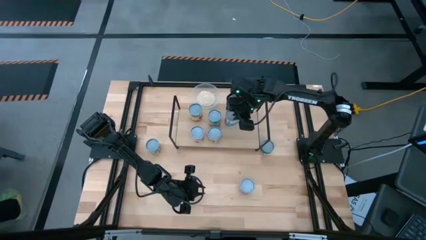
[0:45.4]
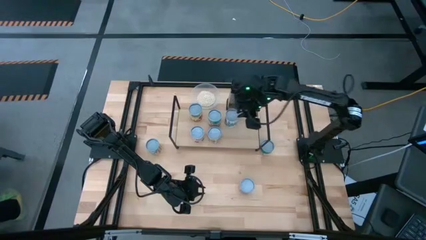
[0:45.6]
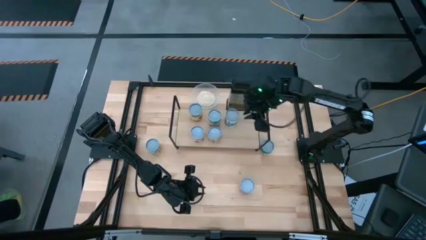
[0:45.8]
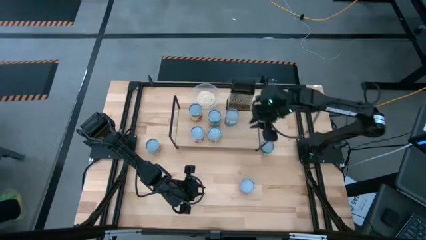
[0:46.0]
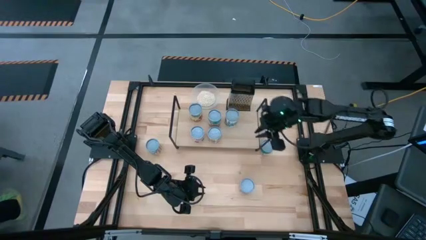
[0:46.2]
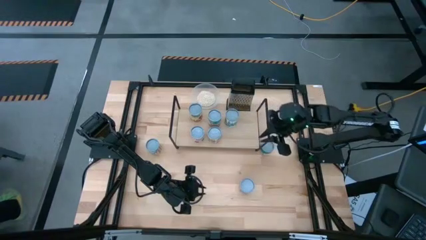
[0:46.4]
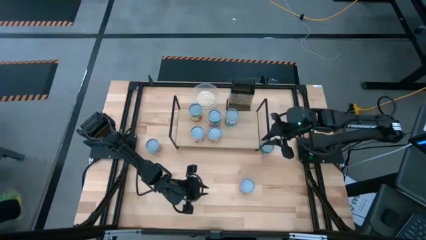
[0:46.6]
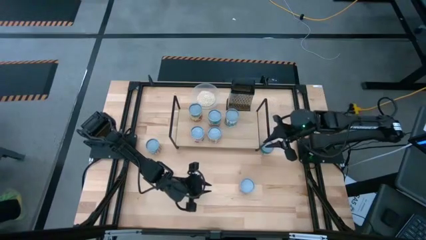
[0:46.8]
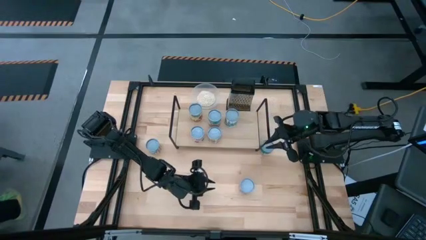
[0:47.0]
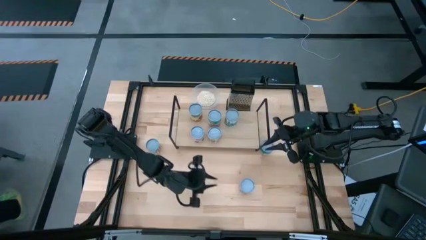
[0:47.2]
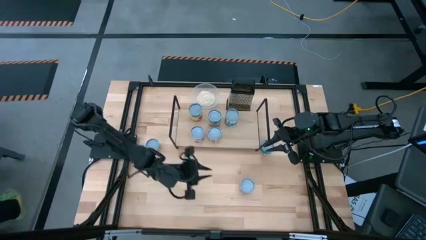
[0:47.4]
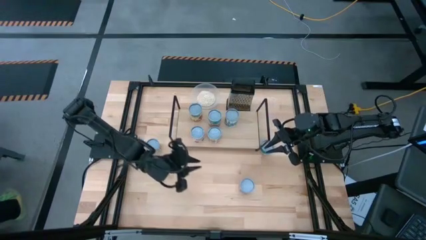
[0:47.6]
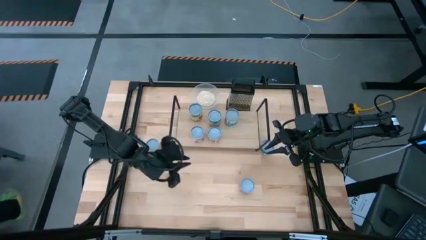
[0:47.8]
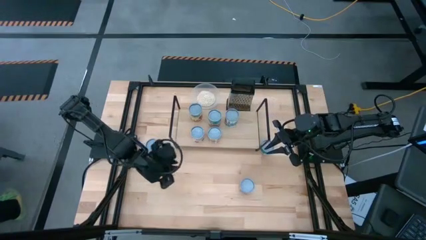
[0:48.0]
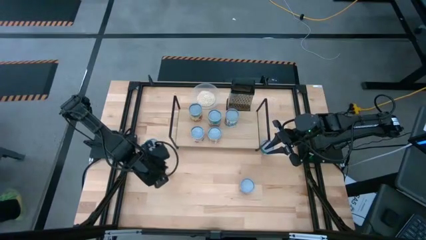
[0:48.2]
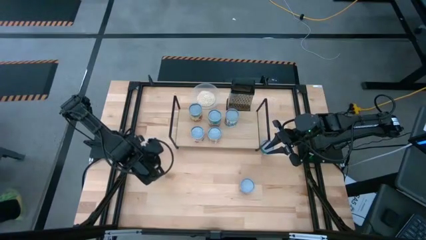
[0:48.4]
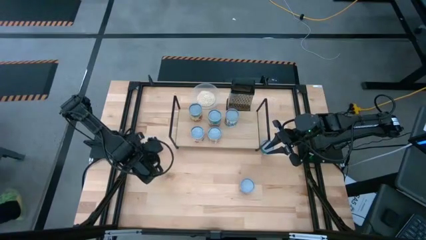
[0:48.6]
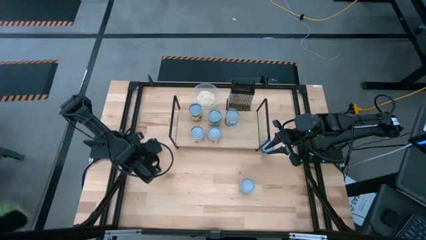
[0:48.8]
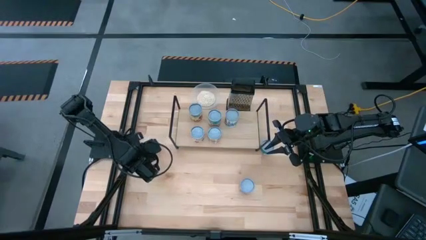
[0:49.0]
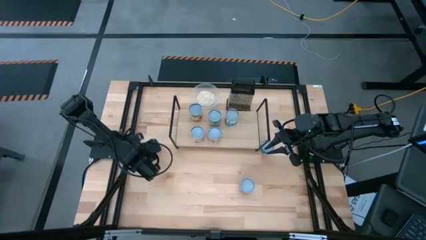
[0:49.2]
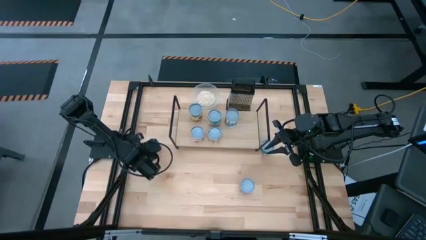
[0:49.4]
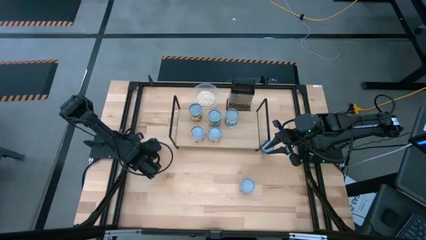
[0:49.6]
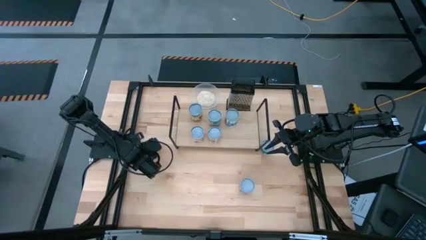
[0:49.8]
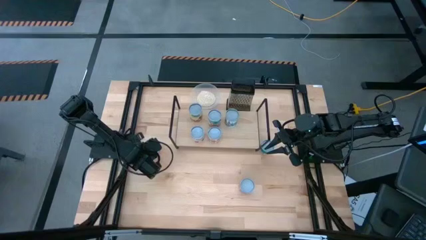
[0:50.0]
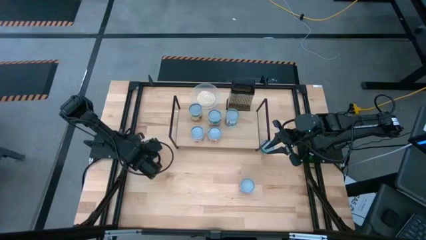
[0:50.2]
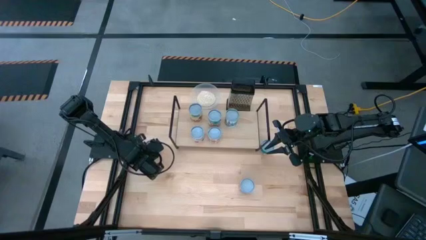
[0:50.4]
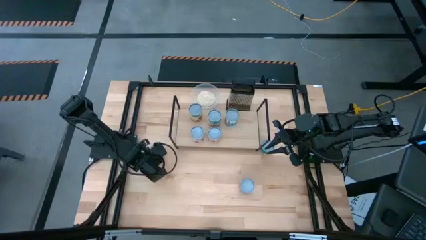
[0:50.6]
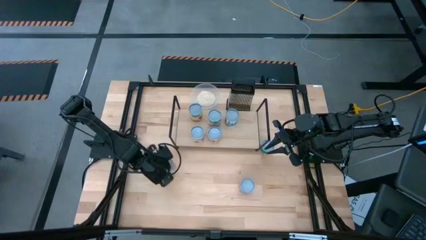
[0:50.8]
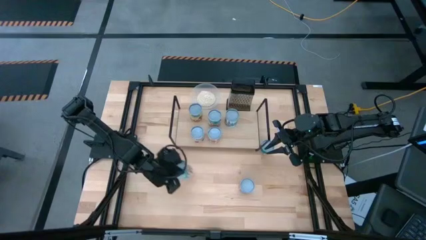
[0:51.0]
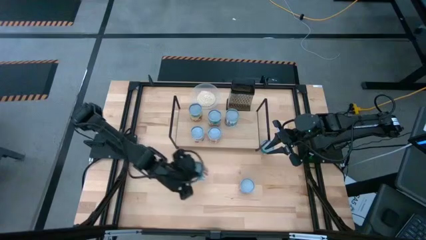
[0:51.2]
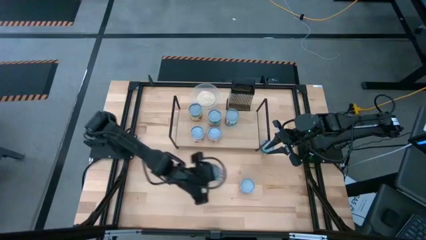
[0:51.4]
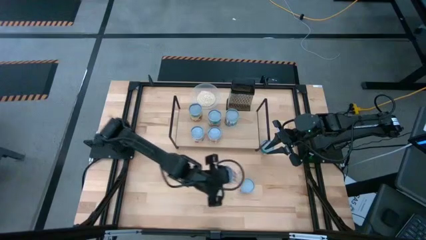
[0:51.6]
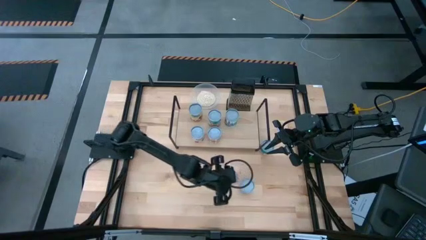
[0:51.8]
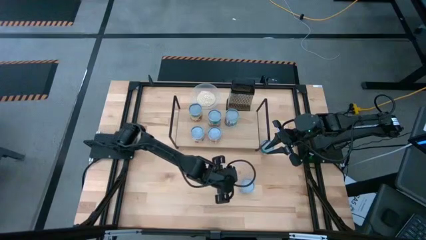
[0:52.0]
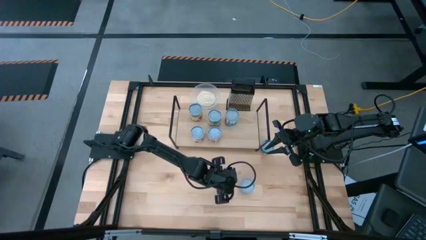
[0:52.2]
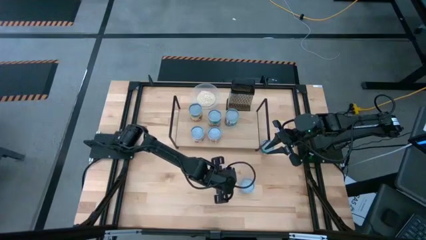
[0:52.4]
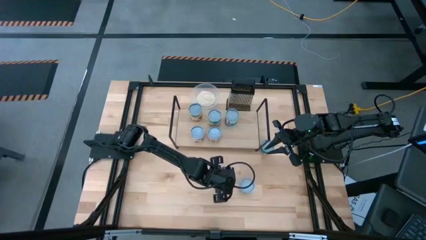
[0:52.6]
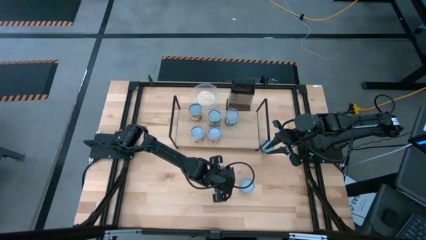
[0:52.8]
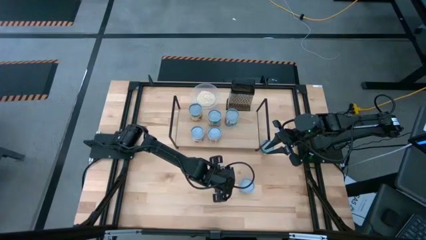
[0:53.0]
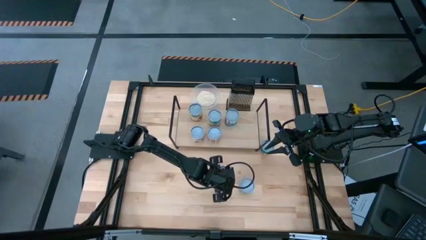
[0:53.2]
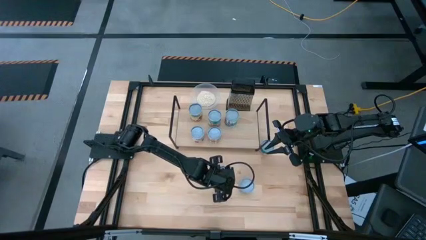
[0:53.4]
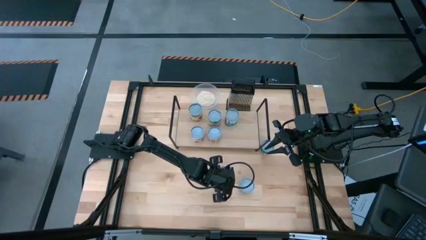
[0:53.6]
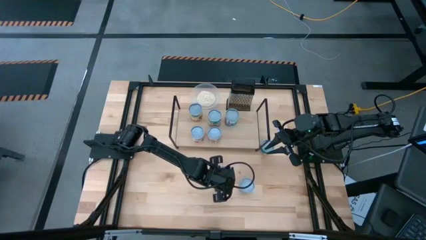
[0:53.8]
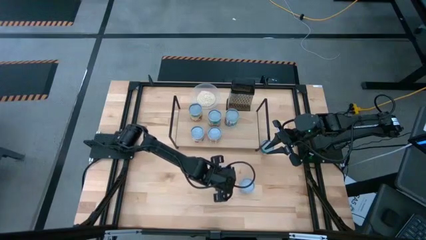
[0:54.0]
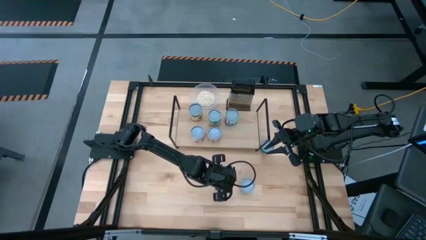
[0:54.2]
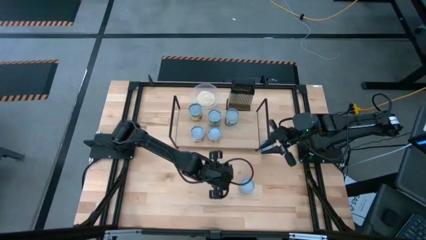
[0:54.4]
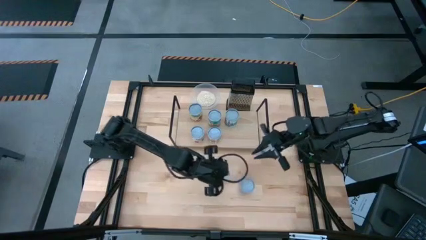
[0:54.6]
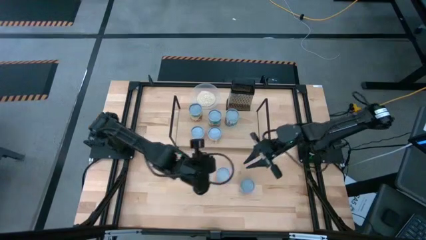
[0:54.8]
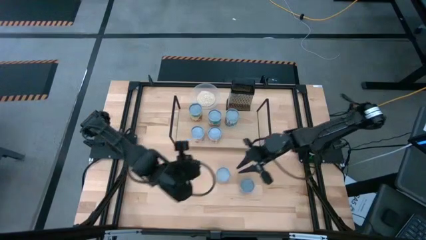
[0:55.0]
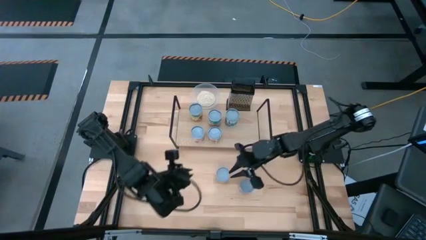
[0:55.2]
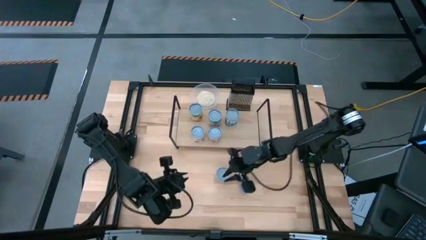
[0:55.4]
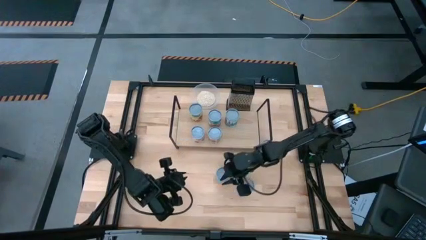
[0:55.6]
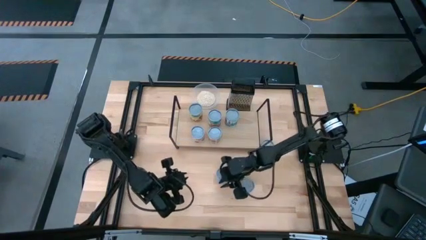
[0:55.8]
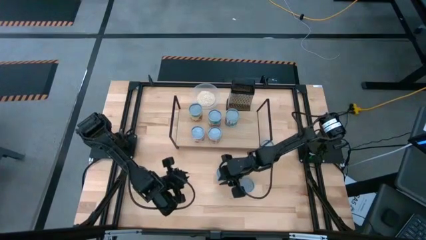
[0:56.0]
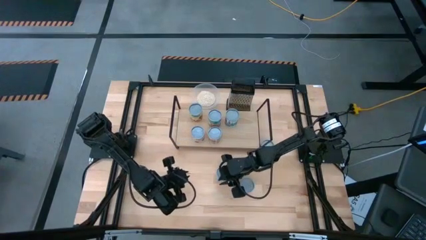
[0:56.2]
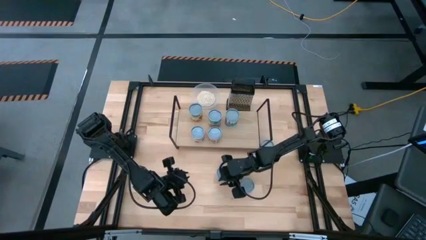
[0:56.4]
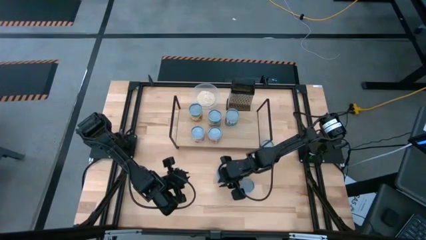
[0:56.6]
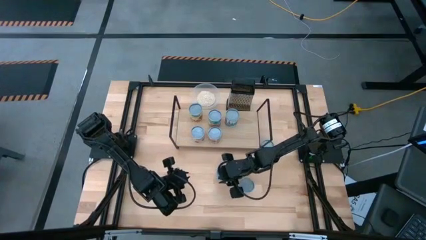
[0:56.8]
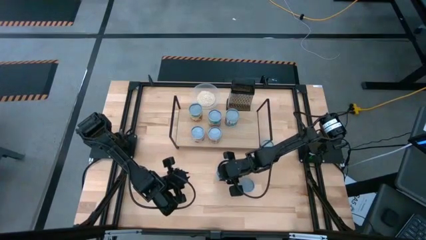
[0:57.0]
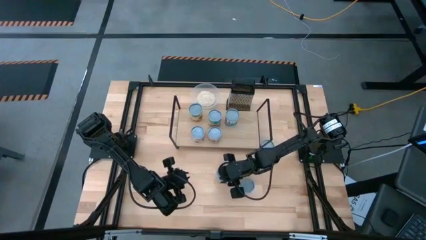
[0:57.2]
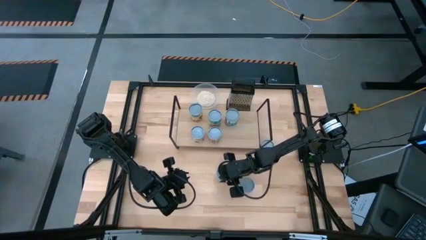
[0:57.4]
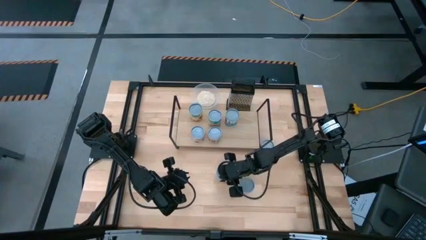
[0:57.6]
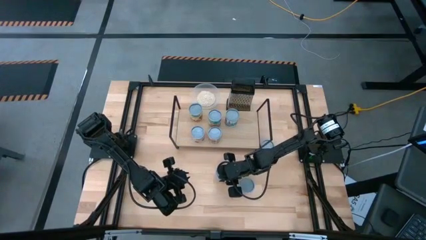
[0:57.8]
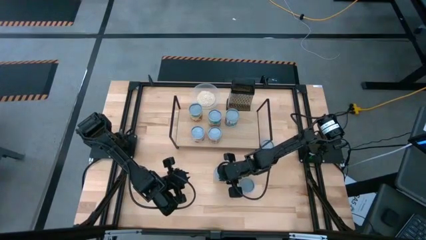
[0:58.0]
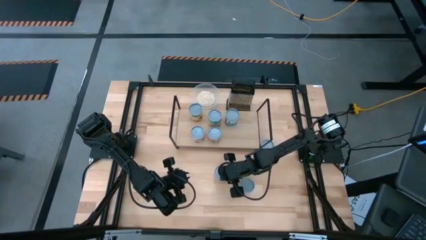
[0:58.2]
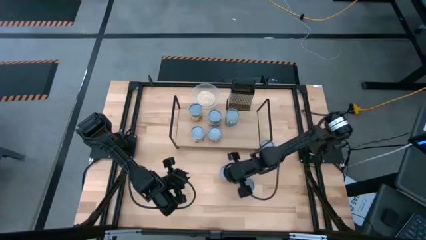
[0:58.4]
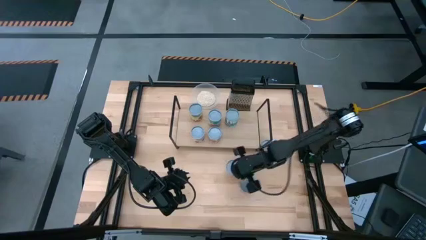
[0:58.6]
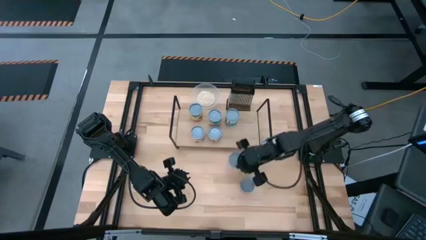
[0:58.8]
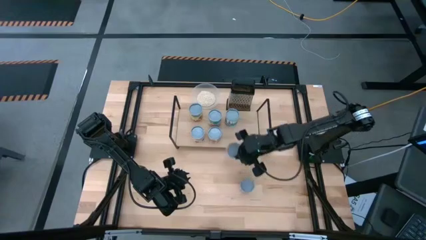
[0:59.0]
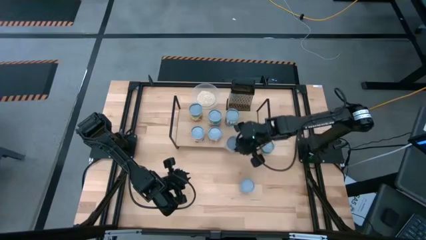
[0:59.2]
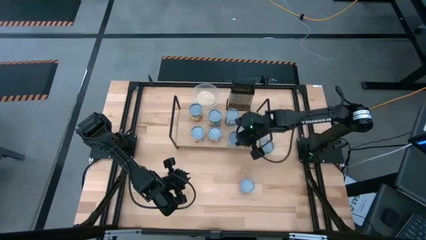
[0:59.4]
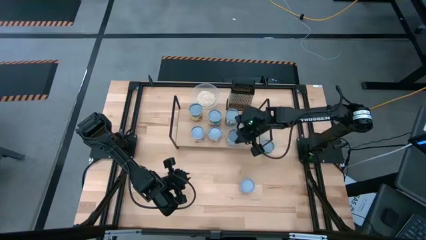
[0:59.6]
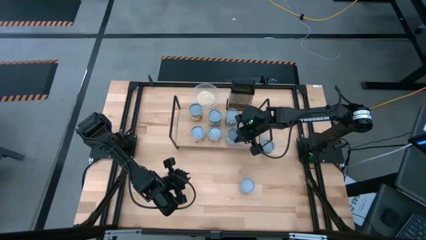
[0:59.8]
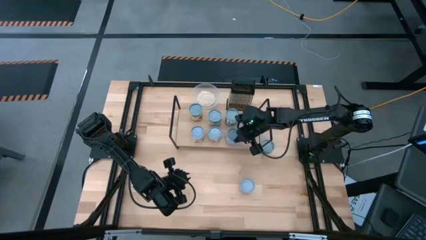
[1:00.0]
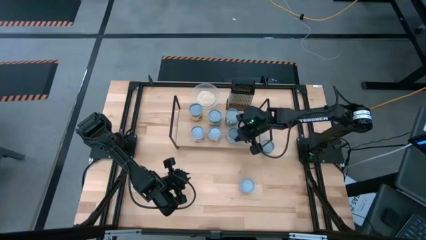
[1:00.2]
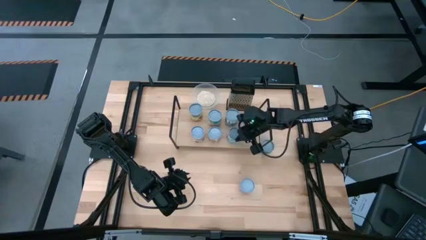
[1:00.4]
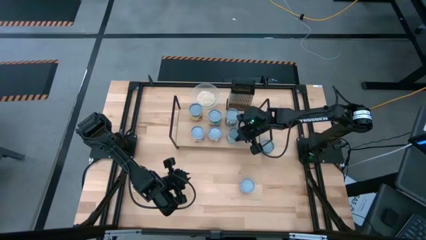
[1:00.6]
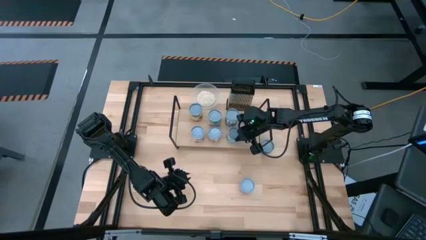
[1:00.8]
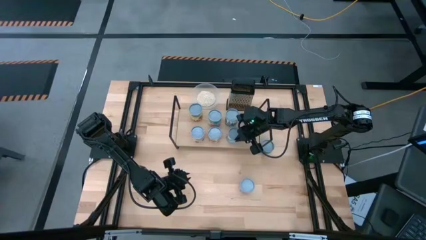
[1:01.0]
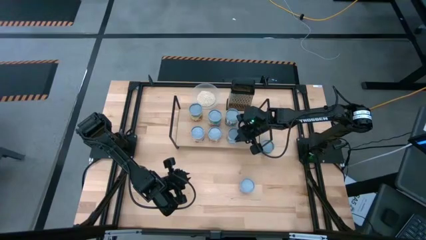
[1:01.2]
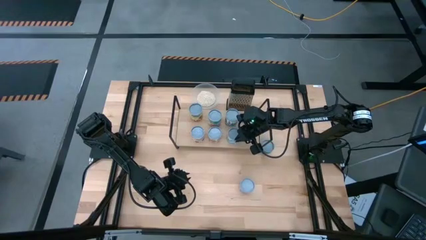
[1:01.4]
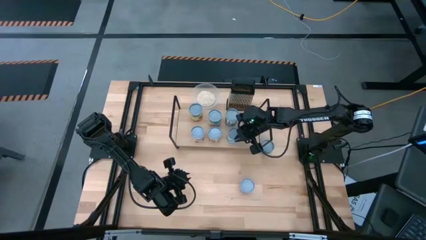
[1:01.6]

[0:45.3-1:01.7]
Task: Pick and place cans onto a shelf
Put the canned sliced carrots on the shelf
